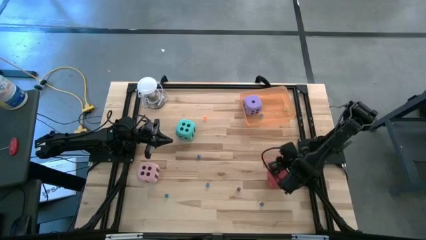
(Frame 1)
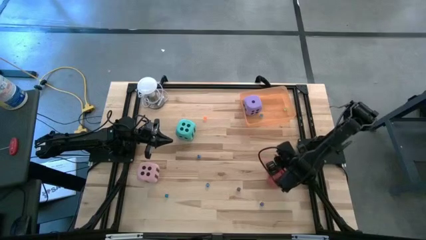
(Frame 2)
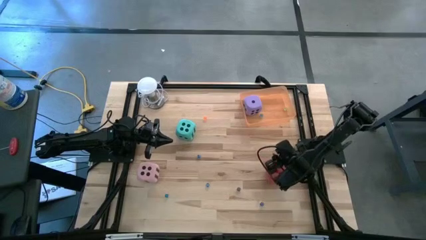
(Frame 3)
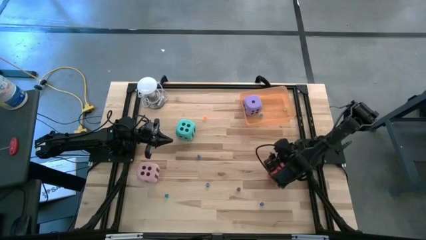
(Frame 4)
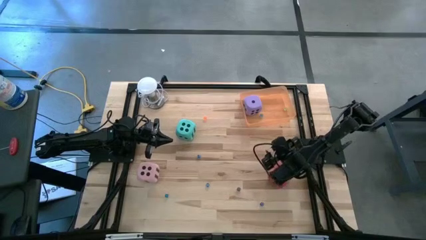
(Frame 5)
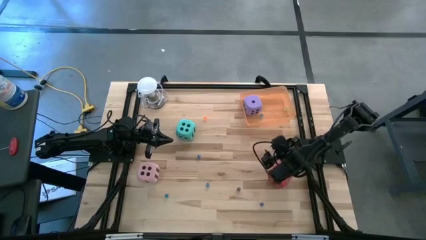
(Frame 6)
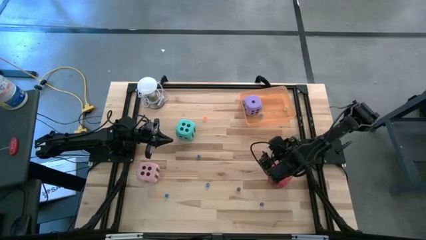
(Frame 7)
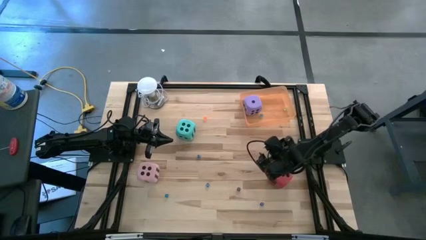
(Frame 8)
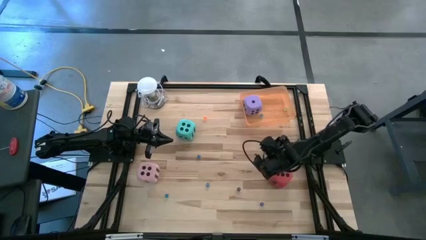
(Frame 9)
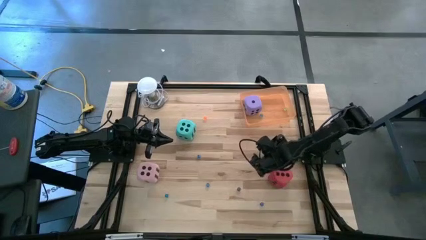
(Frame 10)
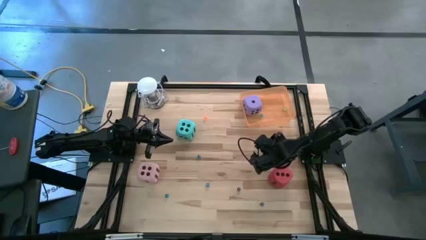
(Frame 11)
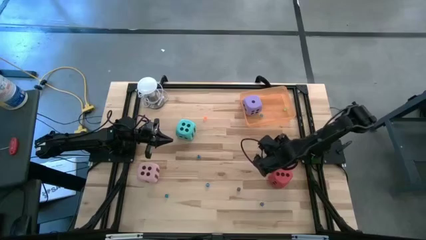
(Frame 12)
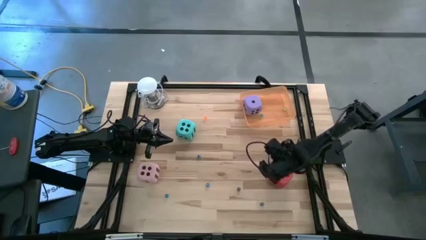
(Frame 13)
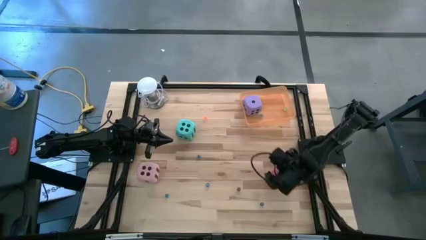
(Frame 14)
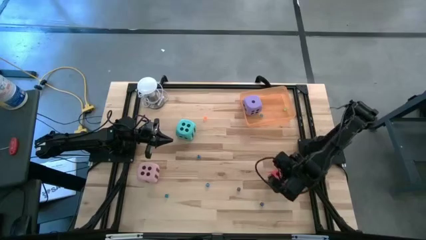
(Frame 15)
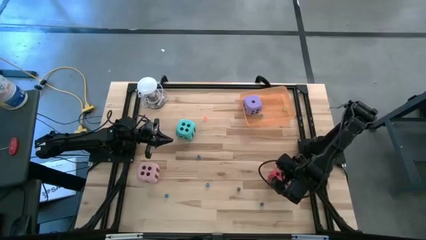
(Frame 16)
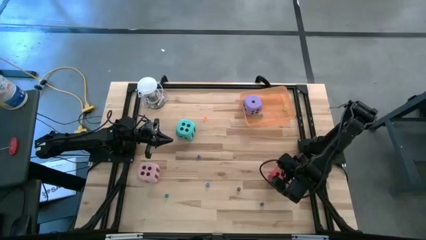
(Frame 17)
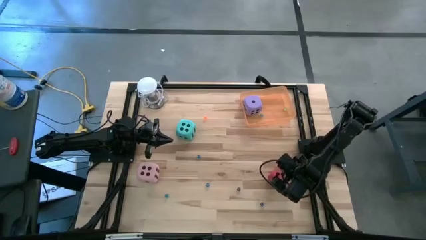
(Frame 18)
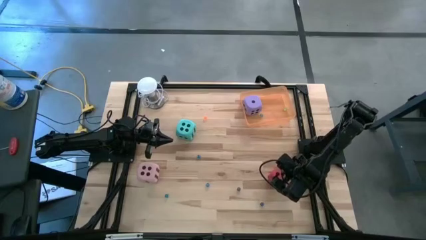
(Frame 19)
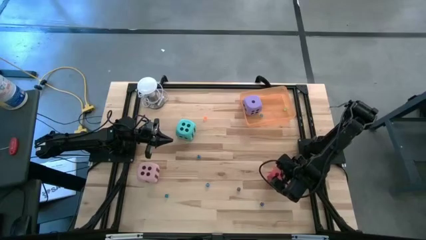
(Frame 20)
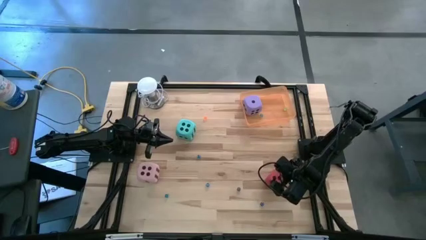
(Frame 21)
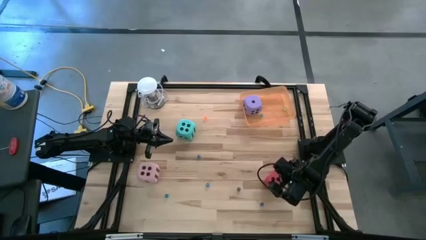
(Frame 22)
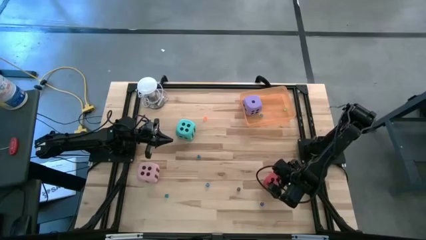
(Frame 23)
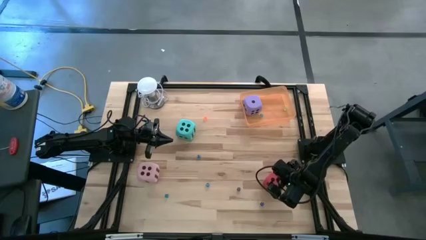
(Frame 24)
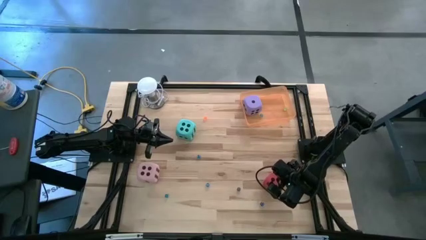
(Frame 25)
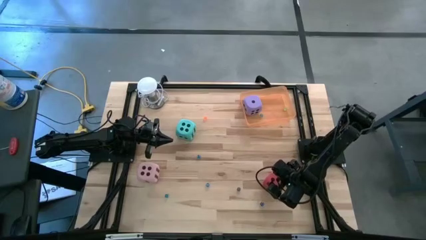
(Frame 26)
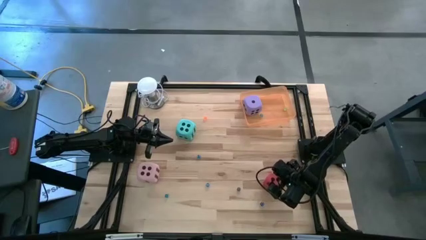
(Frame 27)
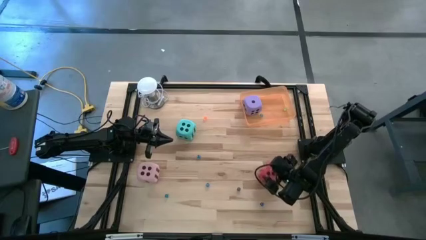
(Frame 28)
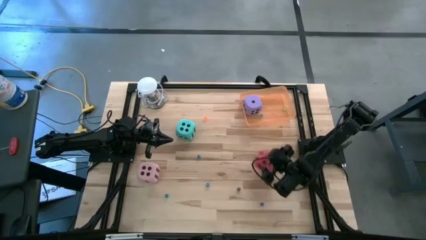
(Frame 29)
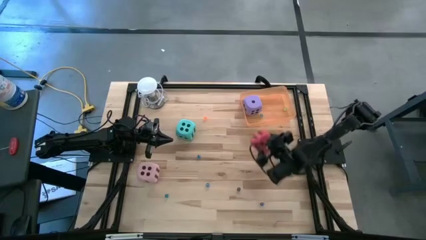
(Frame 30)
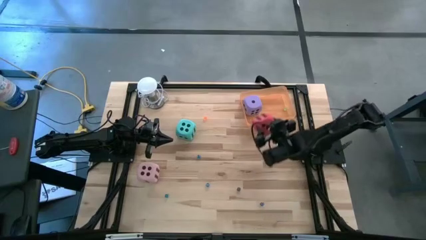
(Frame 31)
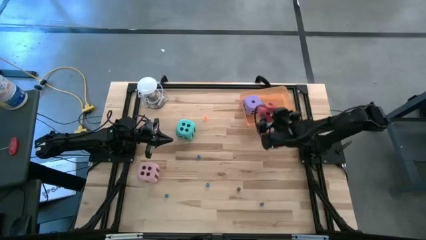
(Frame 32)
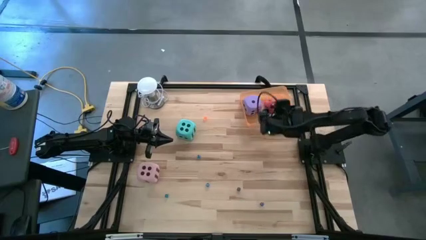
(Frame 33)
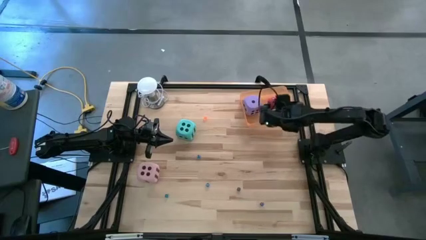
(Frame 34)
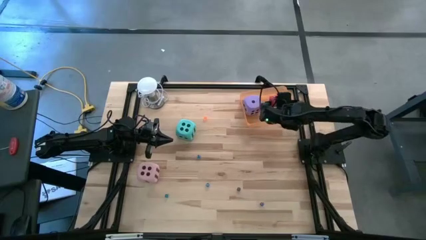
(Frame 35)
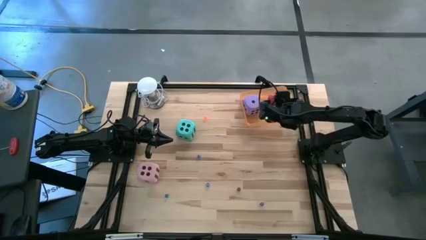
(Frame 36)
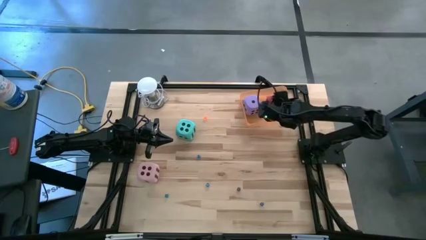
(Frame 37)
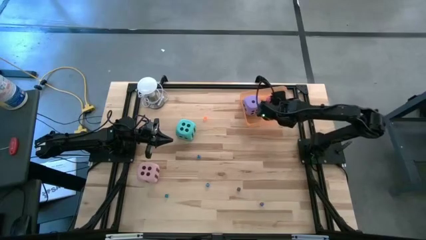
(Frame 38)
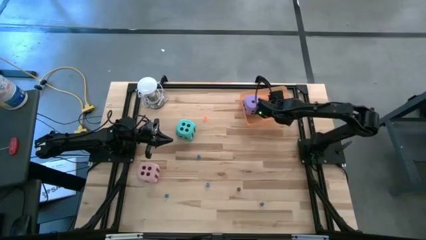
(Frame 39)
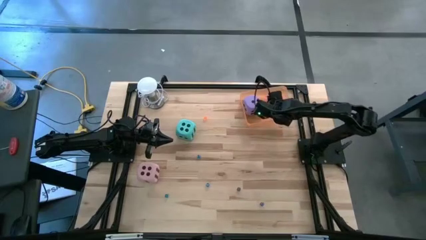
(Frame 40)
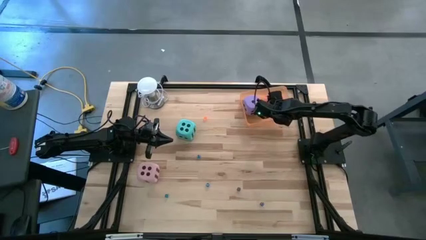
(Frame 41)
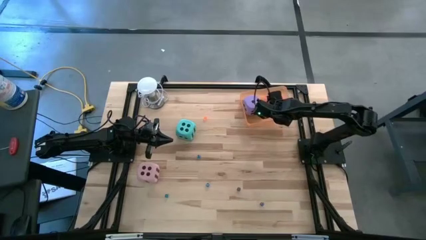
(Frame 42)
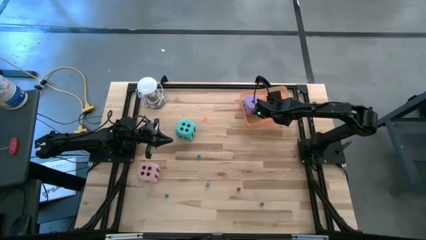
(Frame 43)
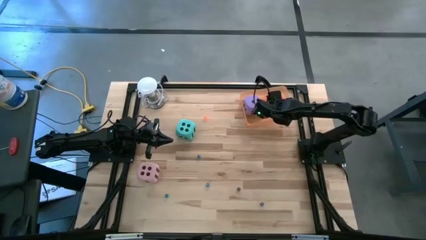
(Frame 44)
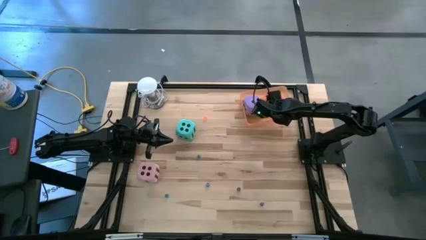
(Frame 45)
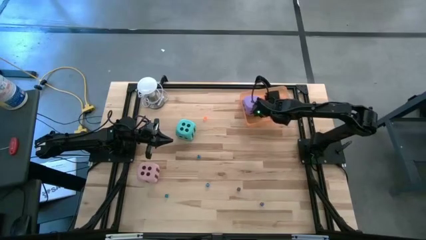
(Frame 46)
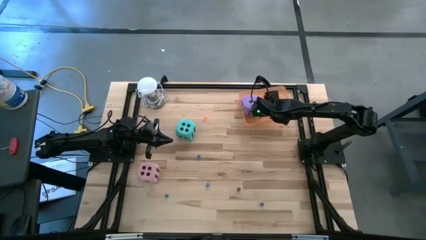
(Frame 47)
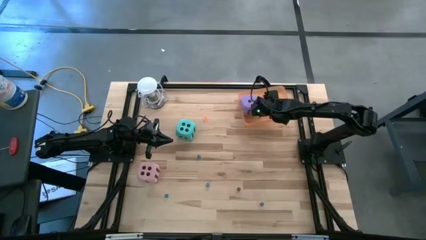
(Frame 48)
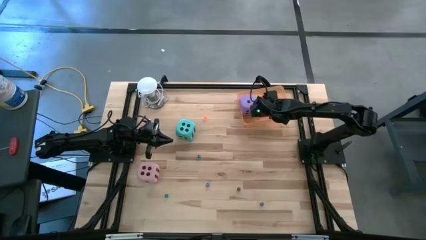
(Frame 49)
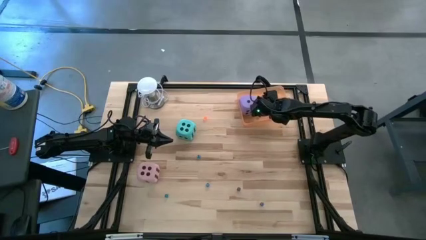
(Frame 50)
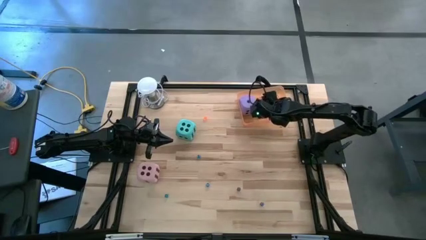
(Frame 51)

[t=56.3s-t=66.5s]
Task: Pick & Place Dice
Put the large red die into the the orange bin

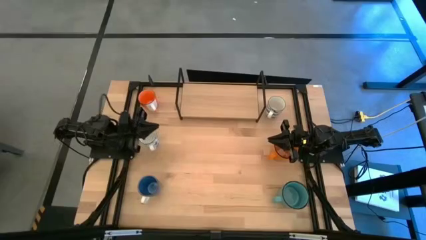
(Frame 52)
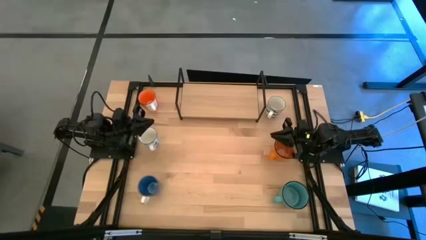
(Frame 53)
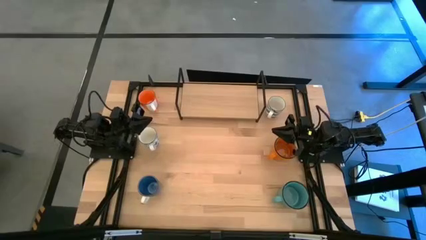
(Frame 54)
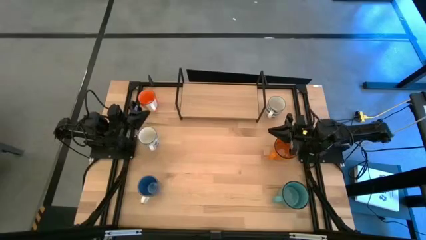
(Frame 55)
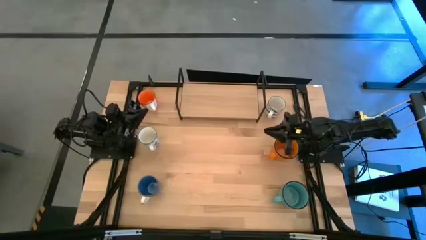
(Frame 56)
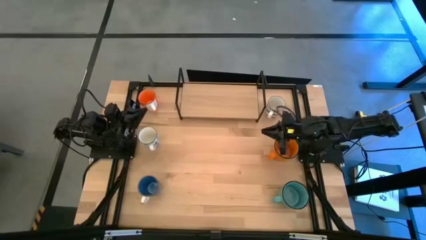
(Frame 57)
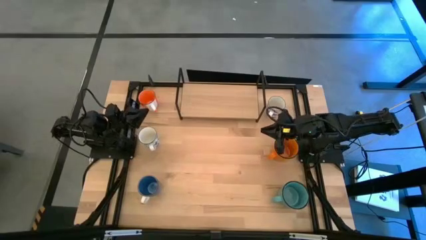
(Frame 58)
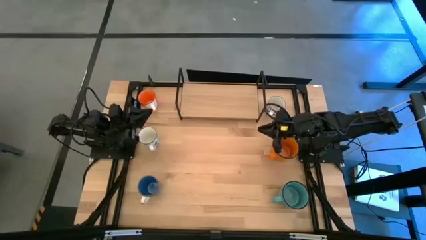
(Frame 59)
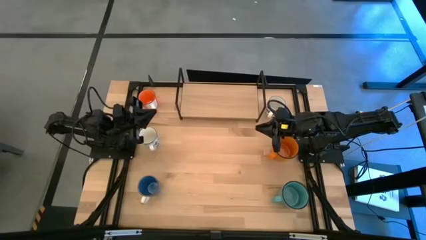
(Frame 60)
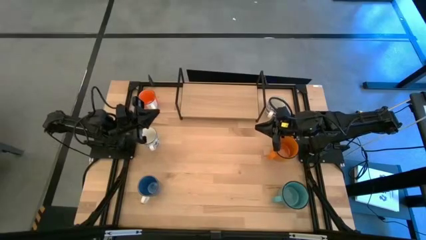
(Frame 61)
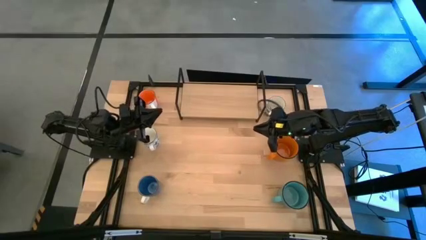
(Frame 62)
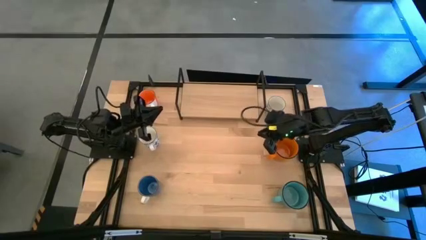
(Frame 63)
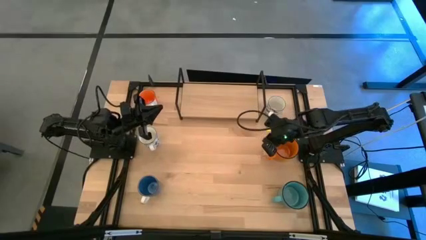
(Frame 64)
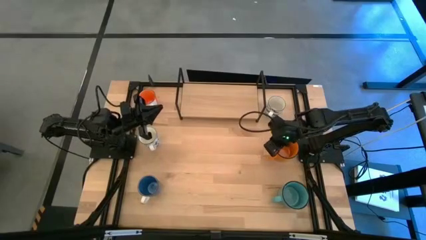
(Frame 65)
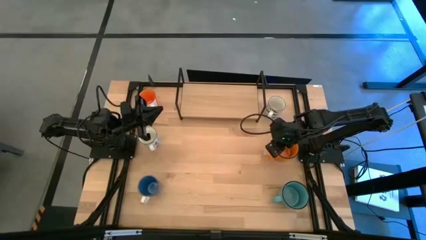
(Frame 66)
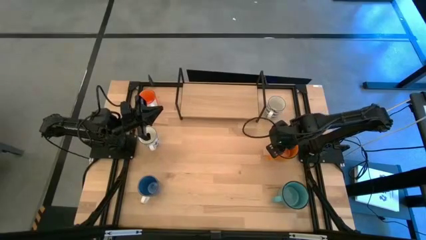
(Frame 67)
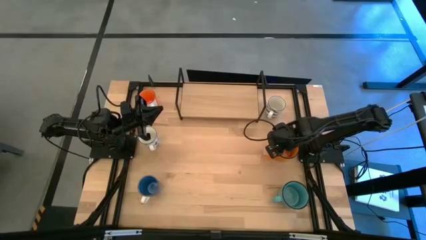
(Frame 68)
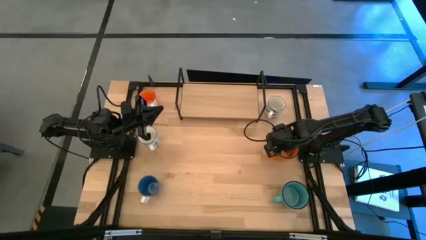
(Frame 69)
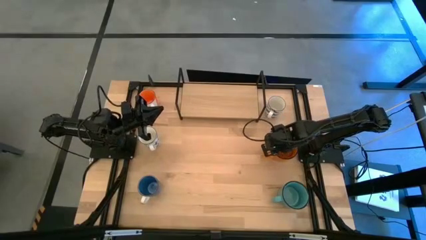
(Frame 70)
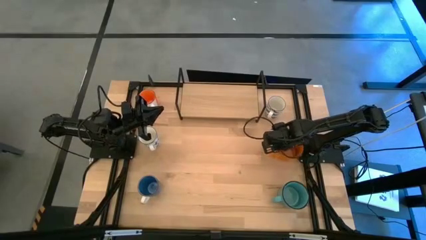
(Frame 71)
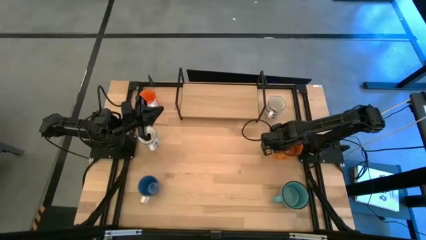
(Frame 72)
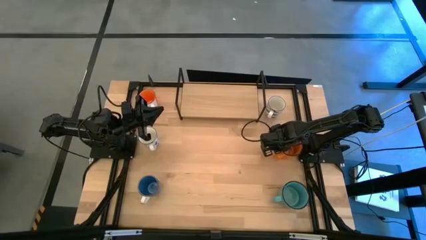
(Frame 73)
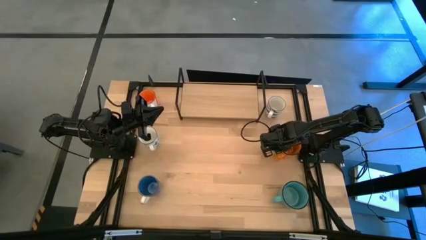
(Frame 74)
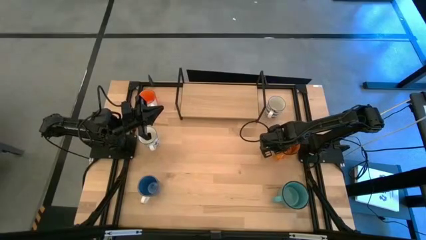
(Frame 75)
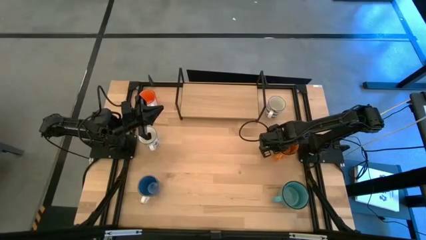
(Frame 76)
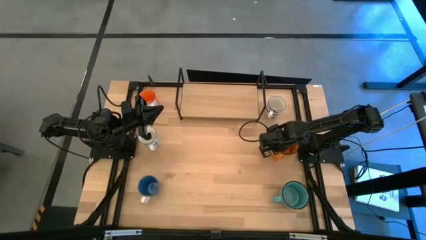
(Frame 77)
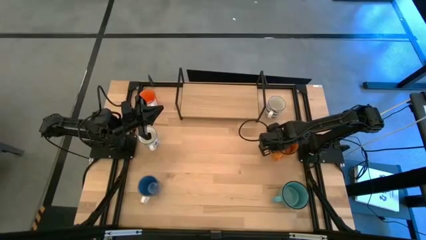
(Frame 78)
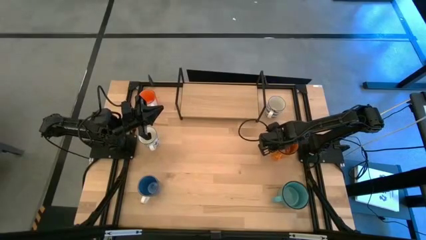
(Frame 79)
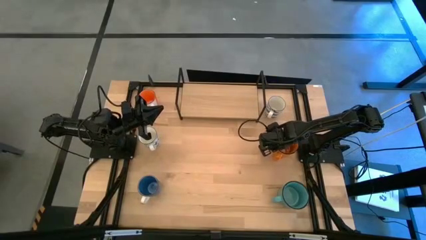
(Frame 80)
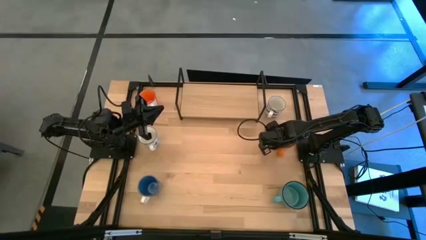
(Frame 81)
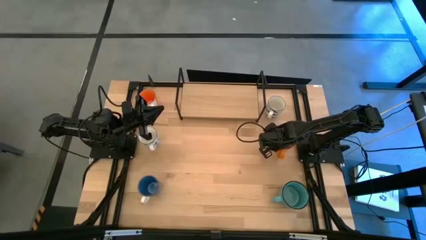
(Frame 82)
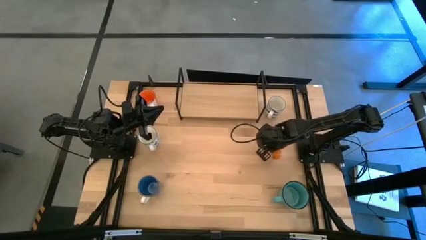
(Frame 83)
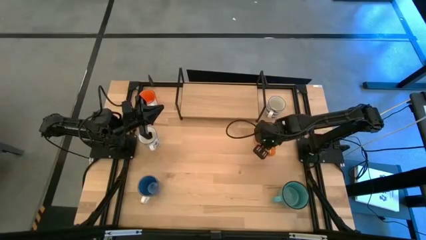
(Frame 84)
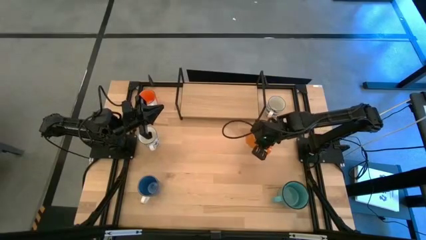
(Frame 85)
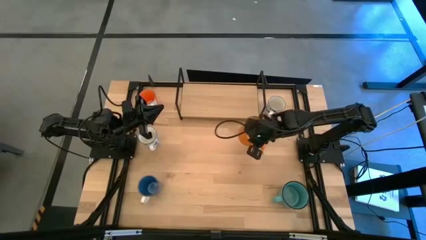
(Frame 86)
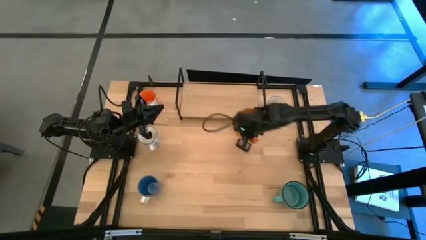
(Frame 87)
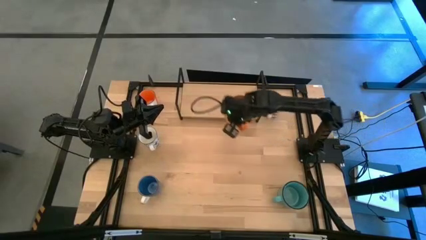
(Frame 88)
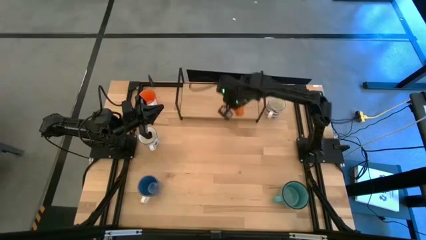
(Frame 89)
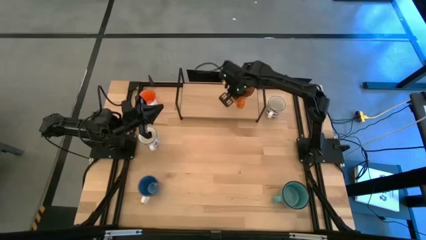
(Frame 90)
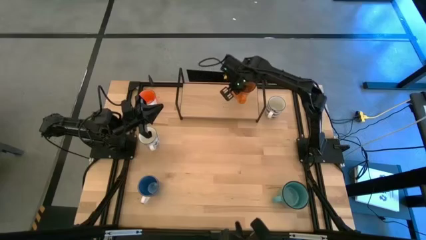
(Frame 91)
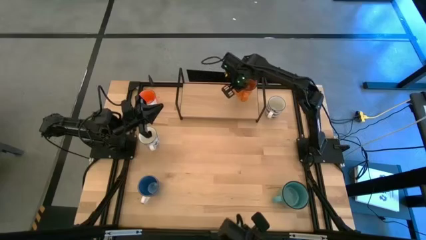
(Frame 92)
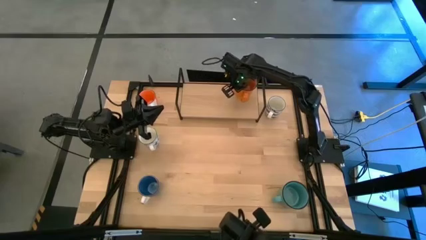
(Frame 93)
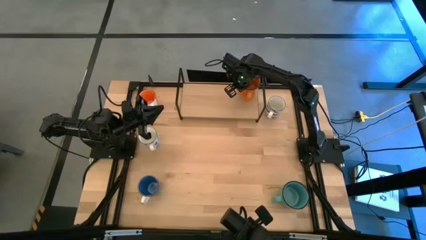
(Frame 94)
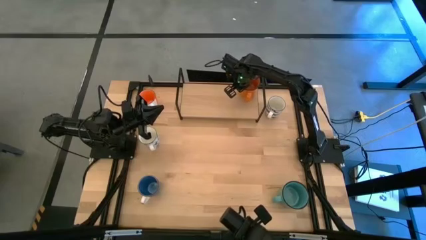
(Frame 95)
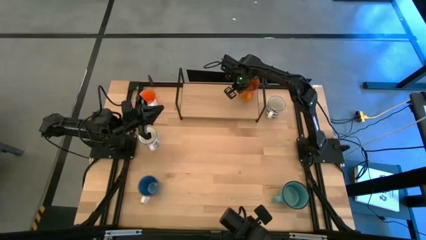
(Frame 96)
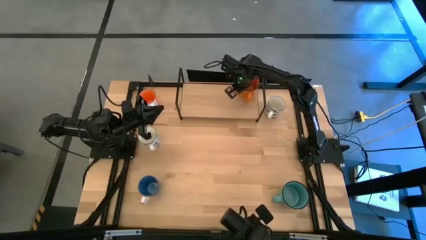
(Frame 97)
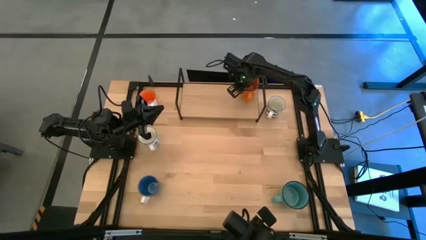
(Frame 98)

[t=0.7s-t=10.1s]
Task: Place coffee mugs
Put the orange mug on the shelf
